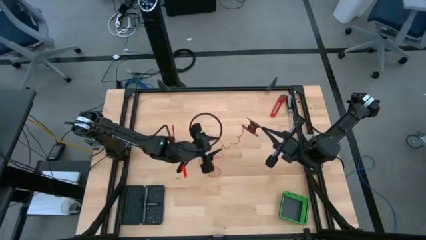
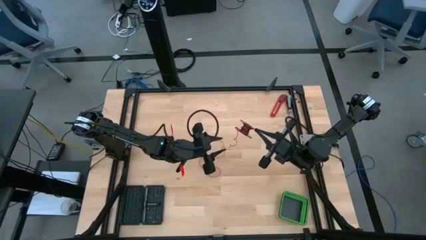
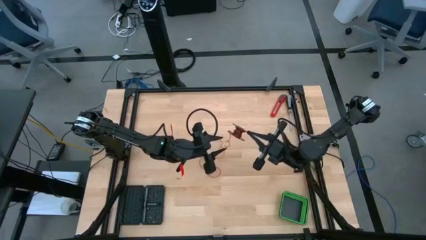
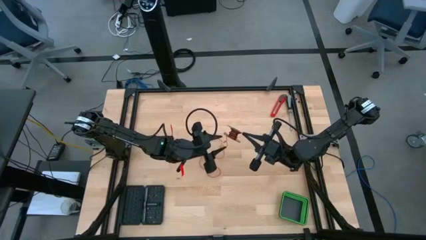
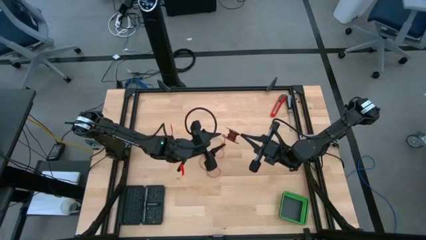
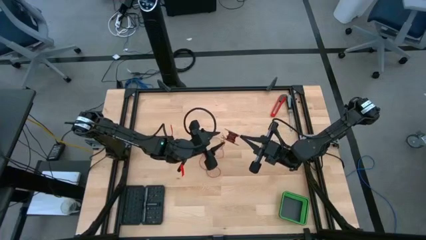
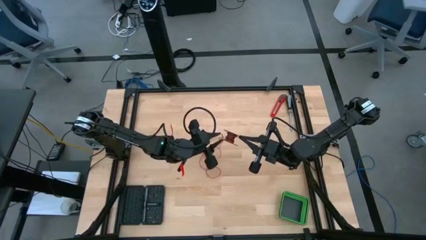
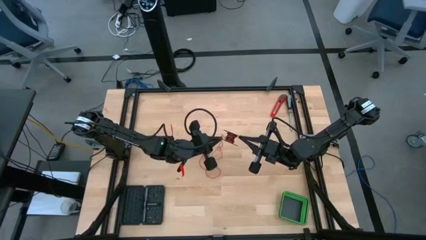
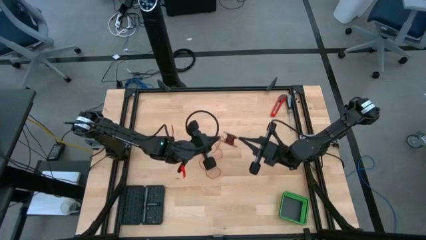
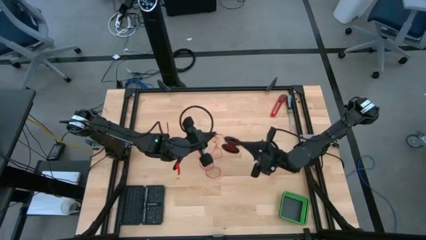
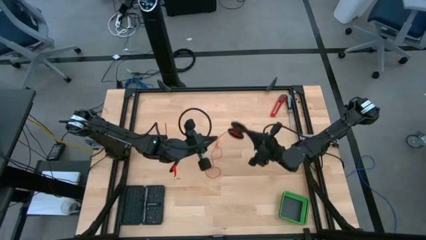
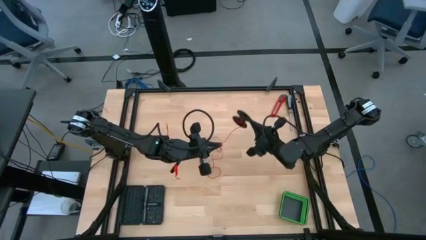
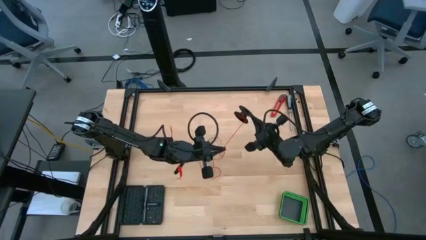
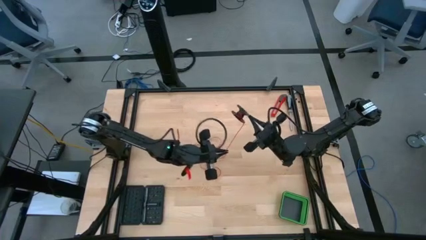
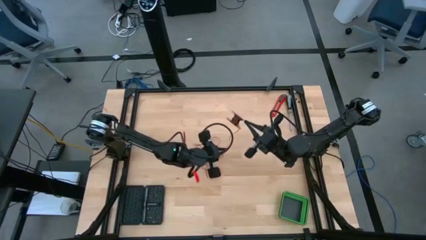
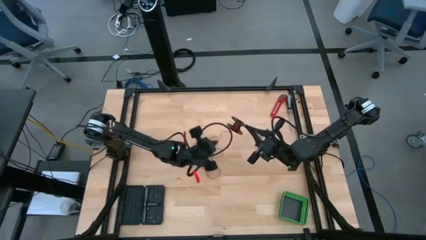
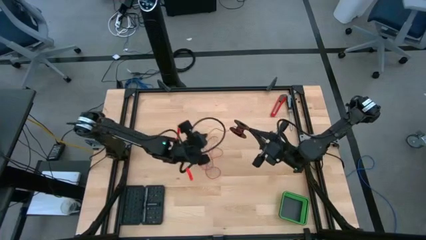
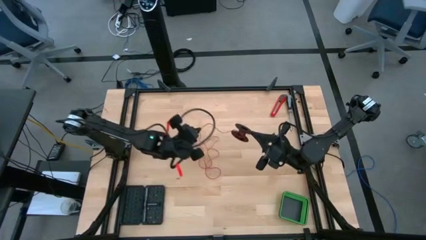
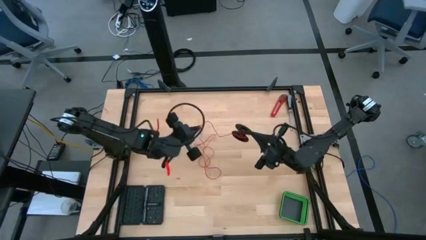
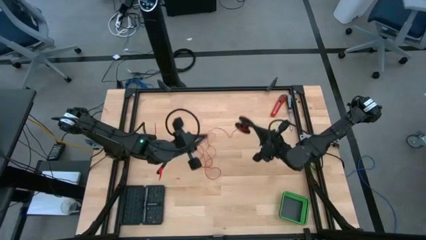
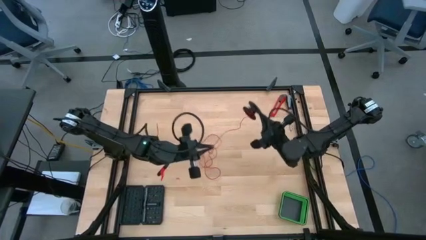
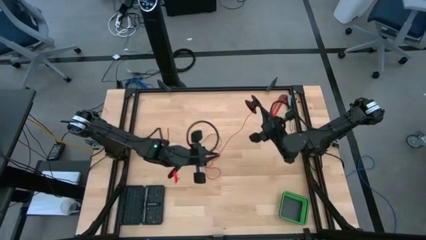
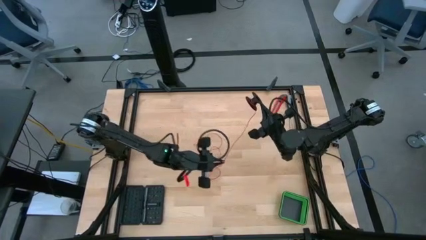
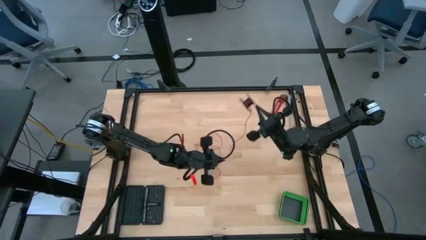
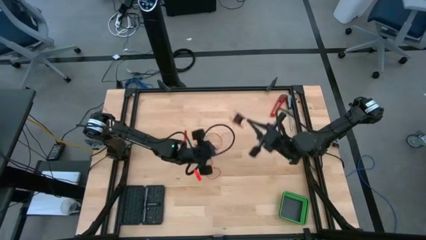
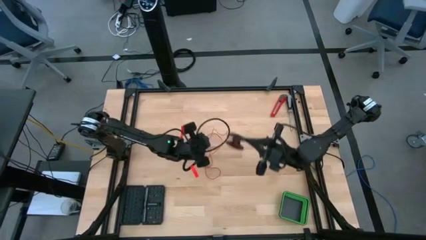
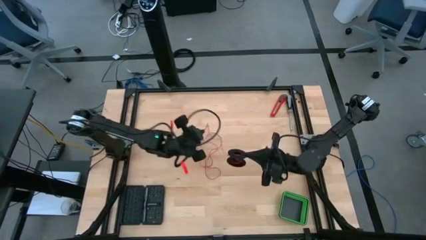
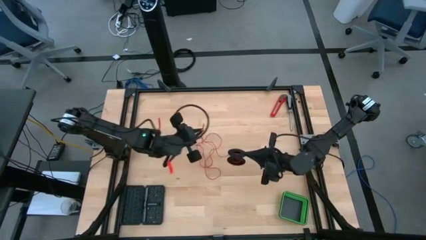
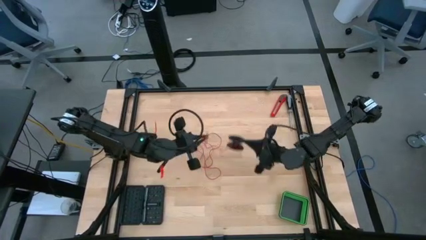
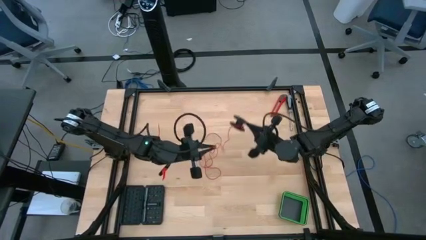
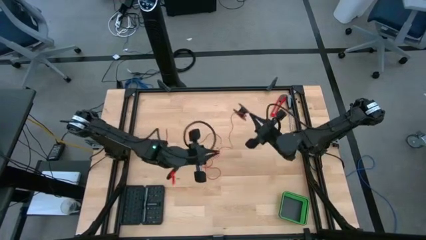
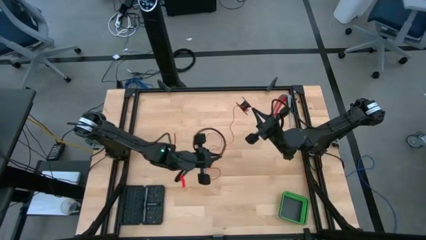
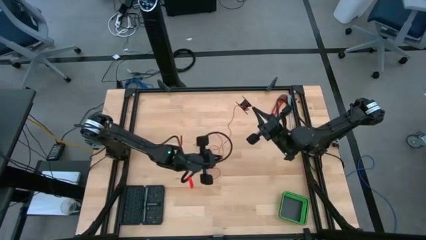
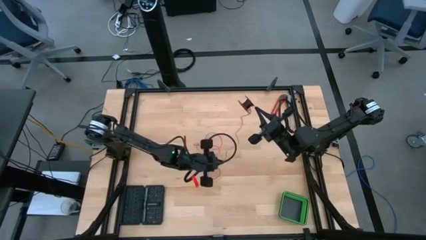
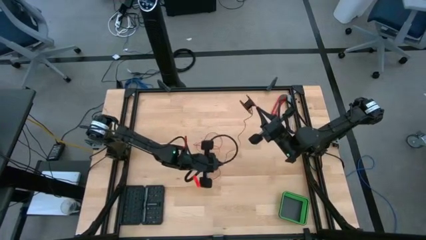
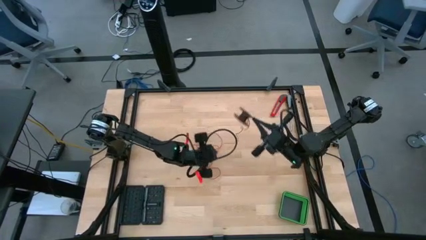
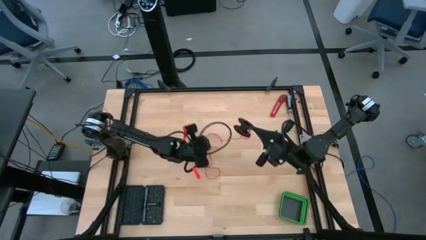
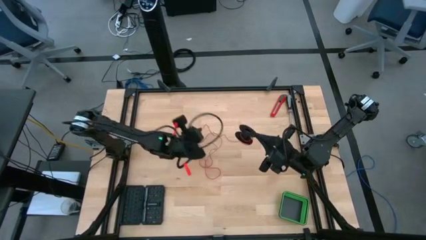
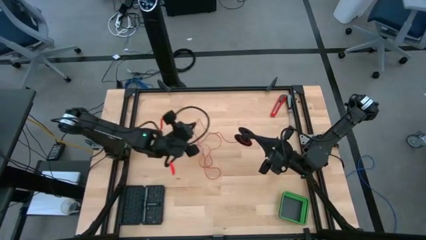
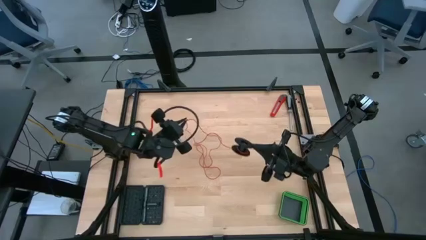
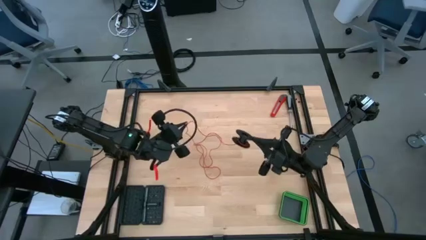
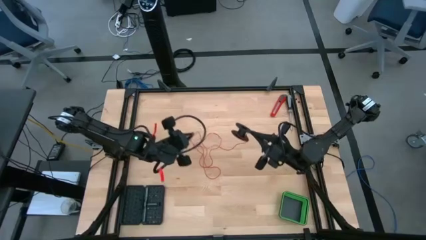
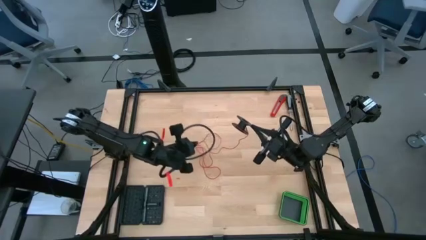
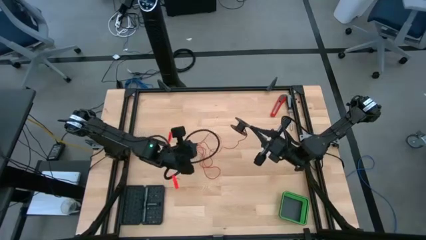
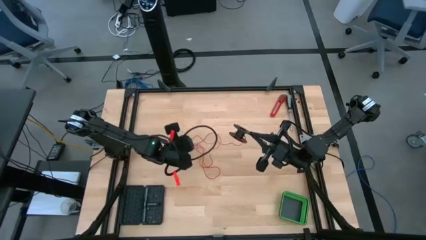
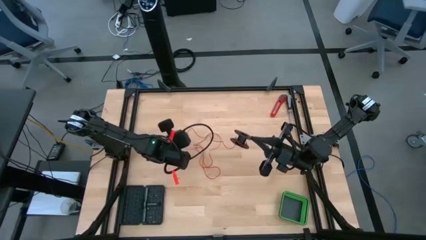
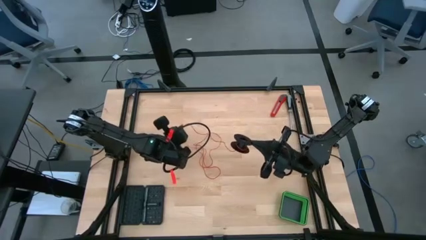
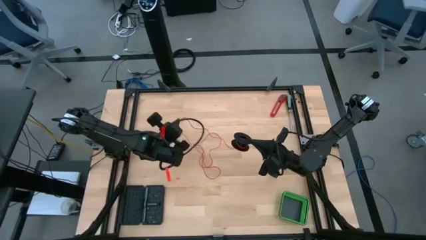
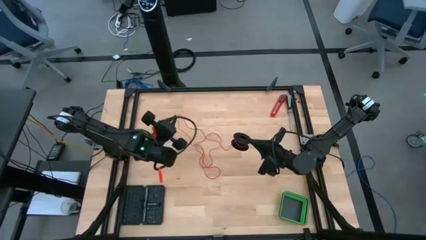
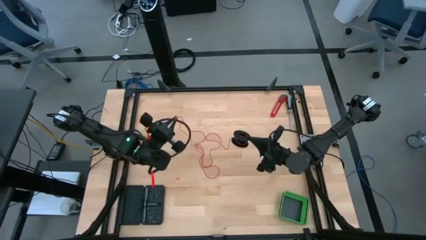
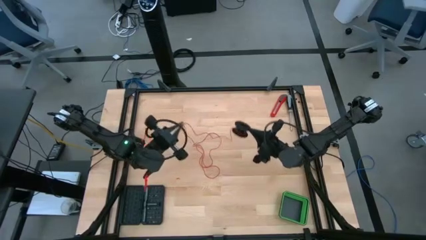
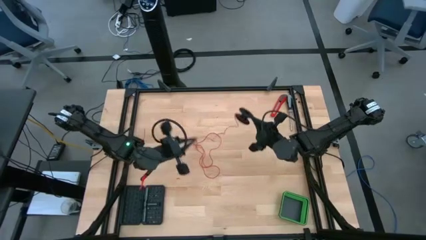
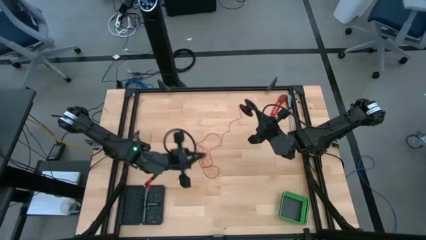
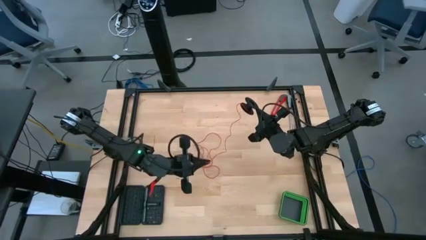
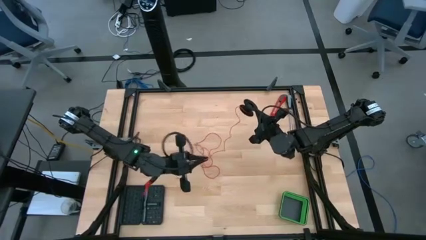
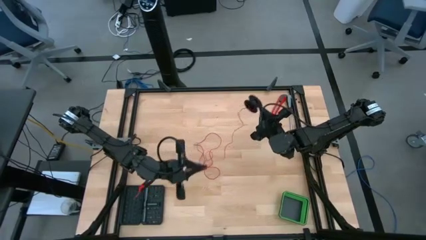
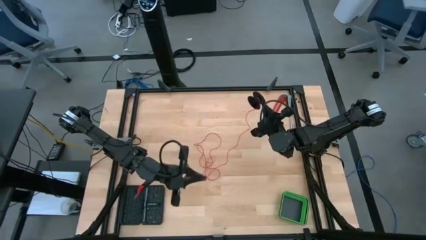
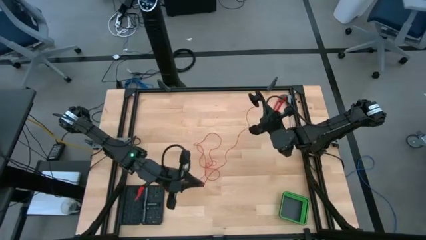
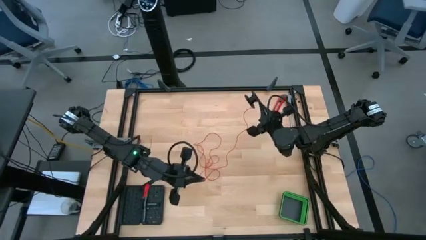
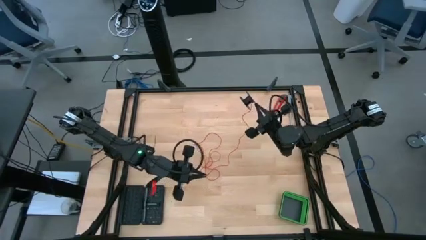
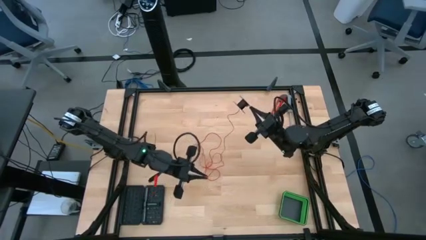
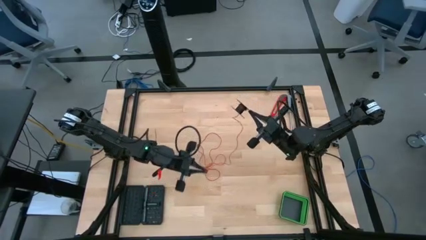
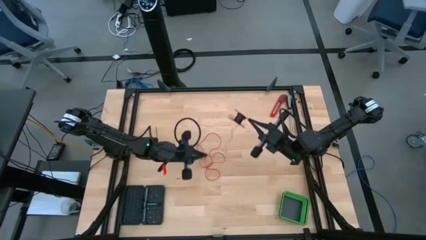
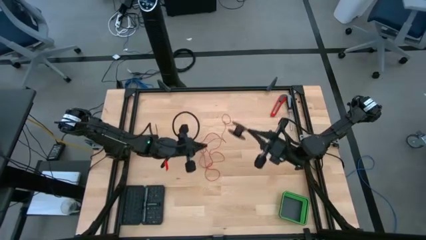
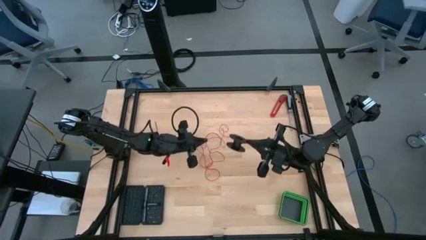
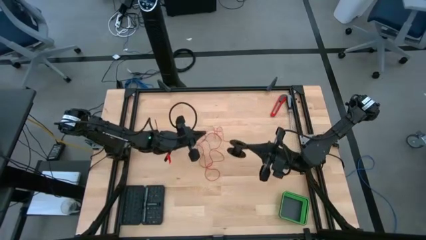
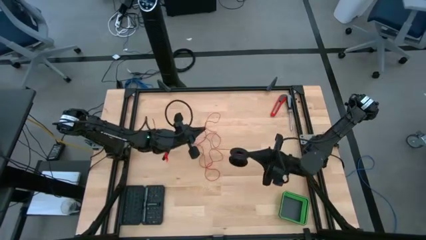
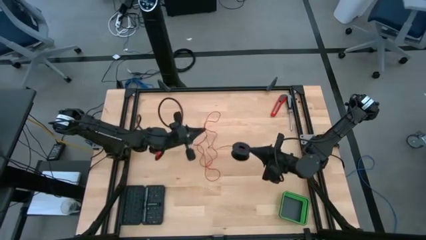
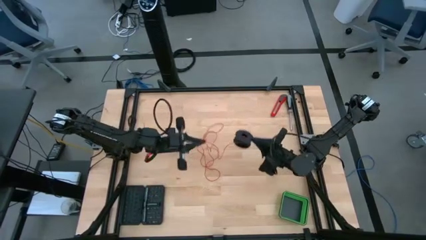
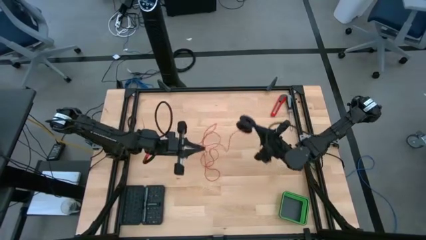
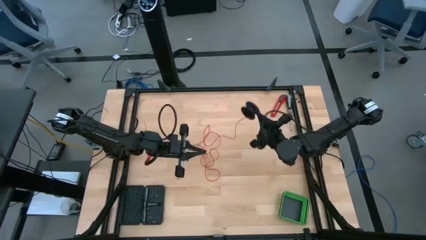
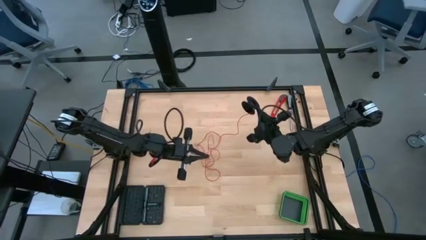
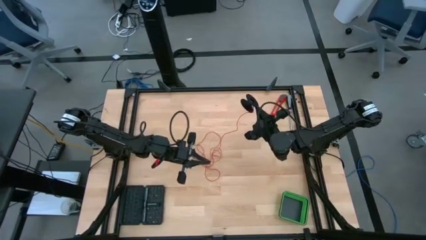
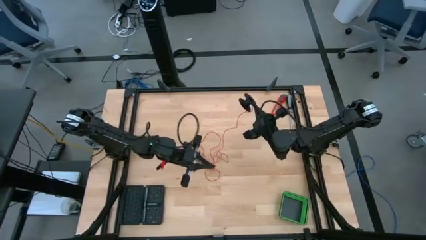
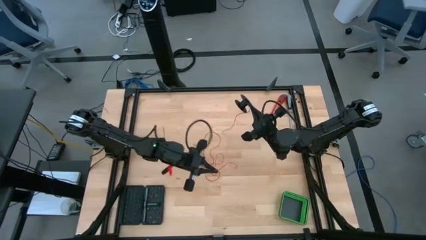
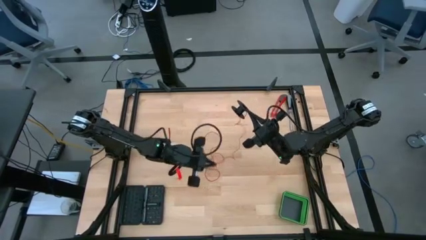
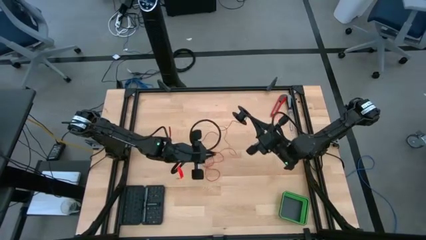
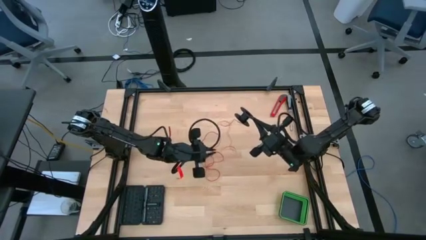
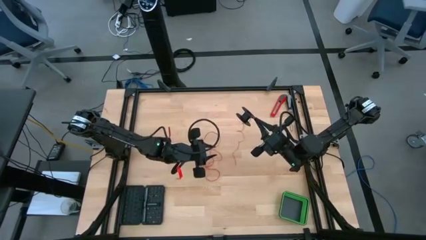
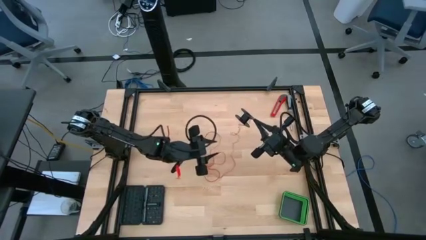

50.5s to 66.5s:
Task: Coil cords
Uncoil the red wire from the black spool
